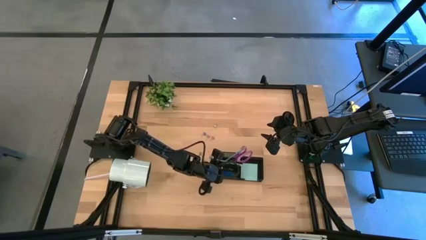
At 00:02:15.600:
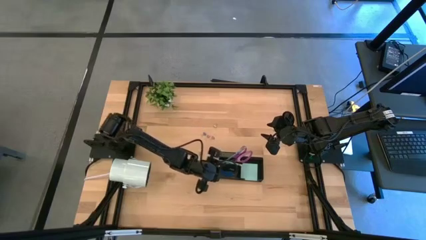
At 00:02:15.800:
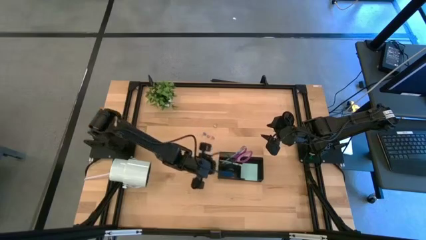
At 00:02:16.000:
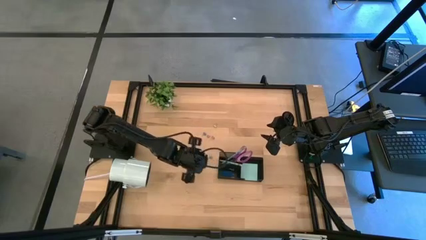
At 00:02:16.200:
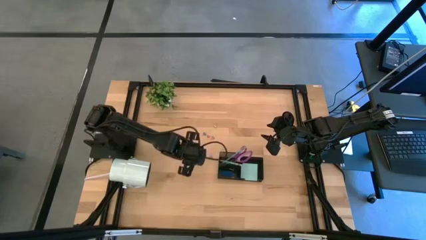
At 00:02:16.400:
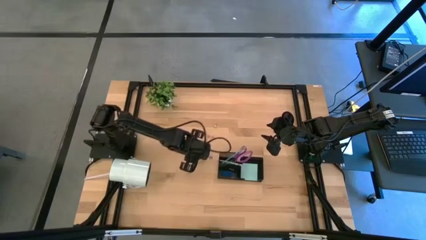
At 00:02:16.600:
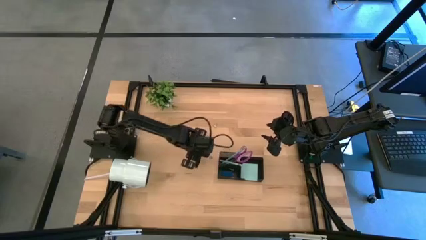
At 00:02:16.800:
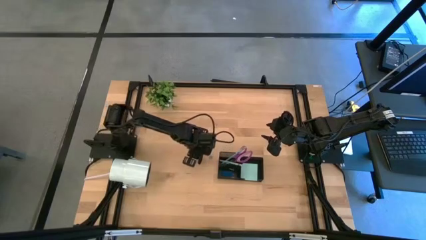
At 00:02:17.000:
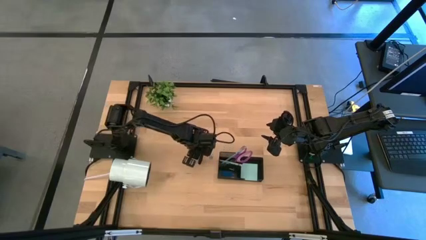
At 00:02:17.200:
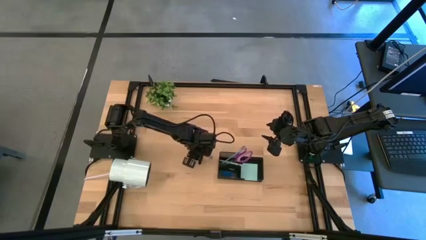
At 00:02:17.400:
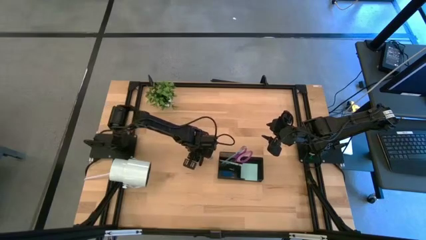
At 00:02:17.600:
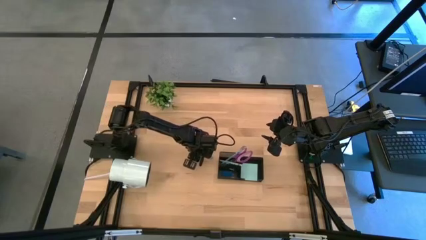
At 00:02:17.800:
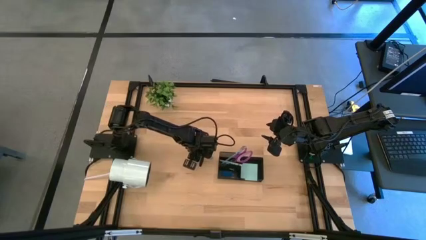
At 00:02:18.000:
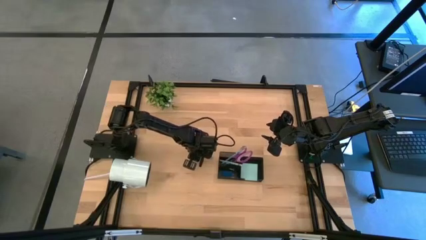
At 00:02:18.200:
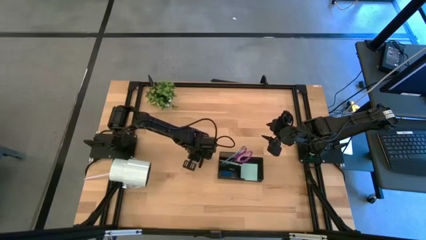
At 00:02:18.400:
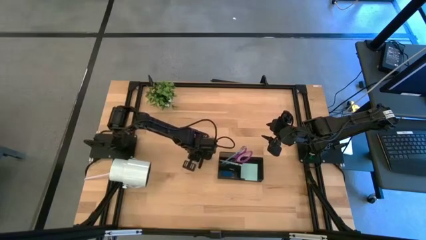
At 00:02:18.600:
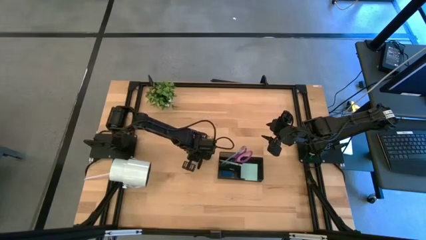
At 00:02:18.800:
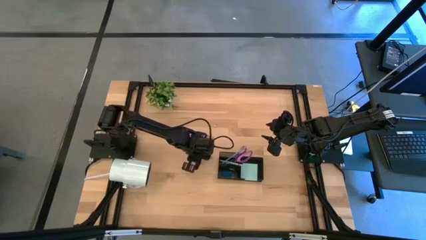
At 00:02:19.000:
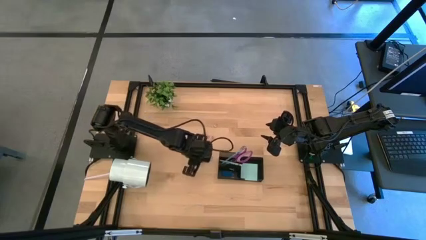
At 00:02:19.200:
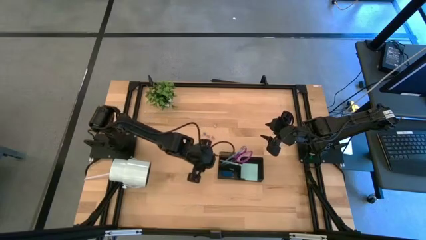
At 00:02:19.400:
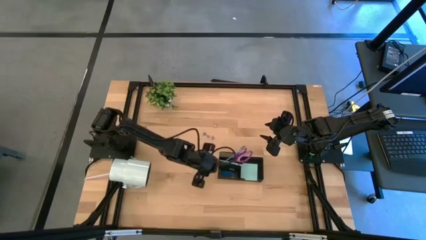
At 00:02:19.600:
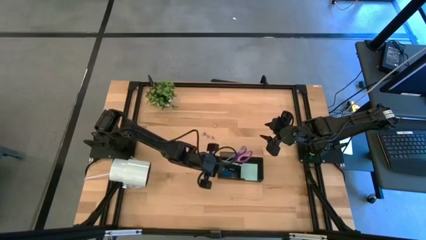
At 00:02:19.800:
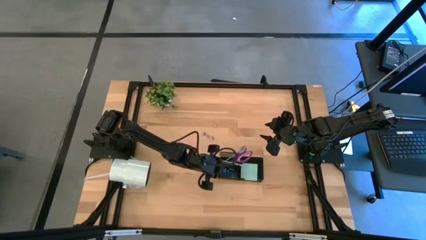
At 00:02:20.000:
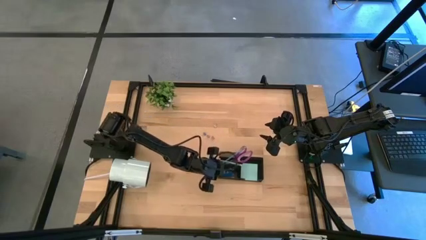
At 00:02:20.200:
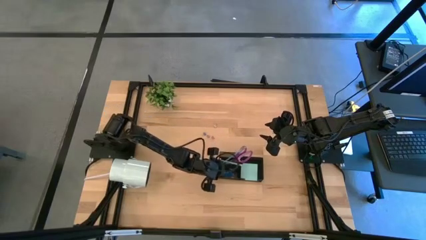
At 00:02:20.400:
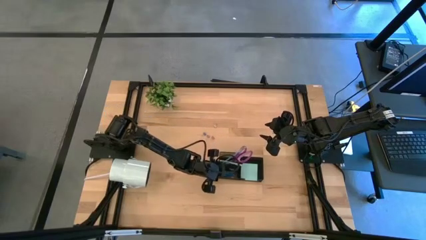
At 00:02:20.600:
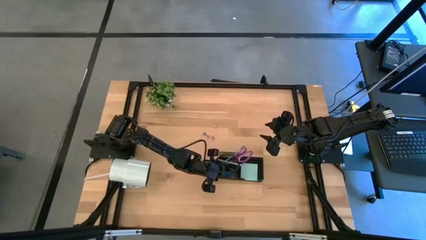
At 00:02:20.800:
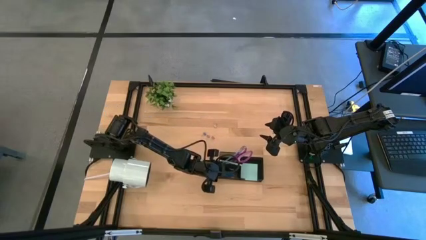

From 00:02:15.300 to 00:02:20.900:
Task: Pick and place office supplies into organizer
Put the bottom right blue binder clip into the desk organizer

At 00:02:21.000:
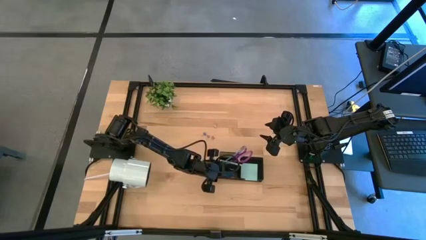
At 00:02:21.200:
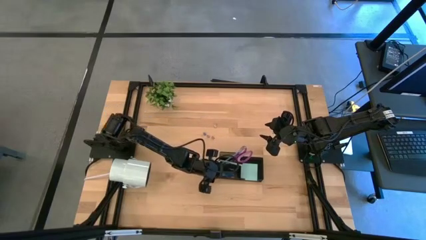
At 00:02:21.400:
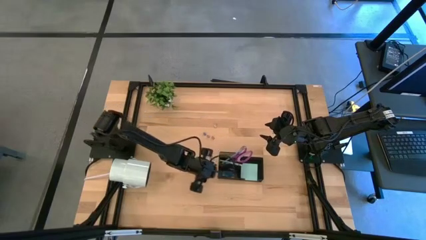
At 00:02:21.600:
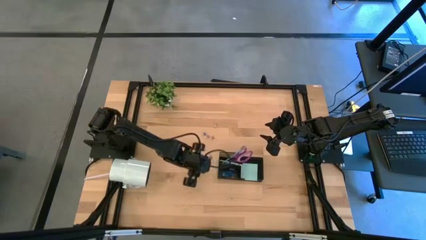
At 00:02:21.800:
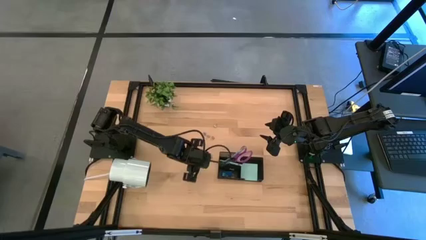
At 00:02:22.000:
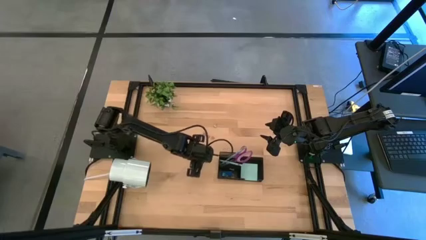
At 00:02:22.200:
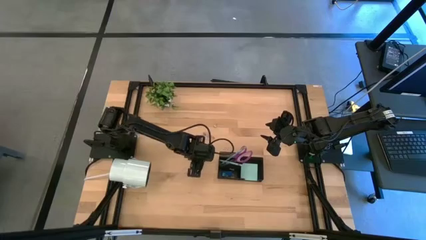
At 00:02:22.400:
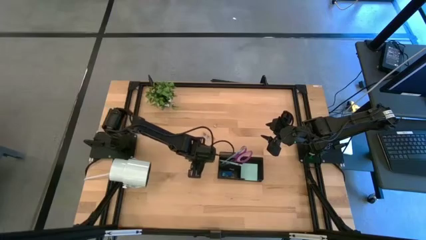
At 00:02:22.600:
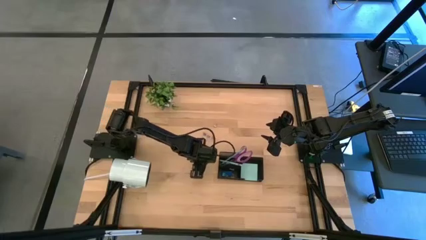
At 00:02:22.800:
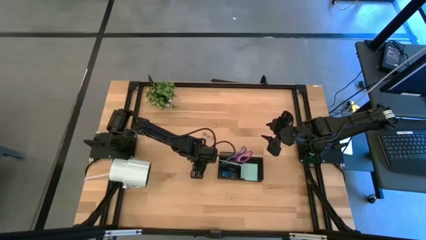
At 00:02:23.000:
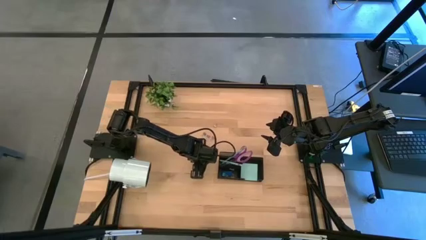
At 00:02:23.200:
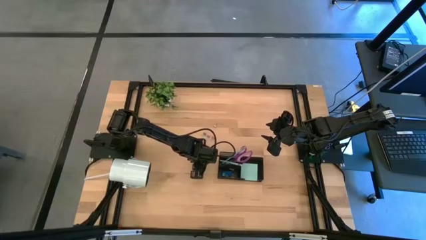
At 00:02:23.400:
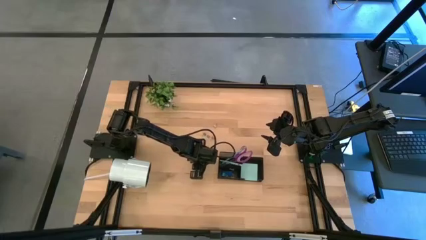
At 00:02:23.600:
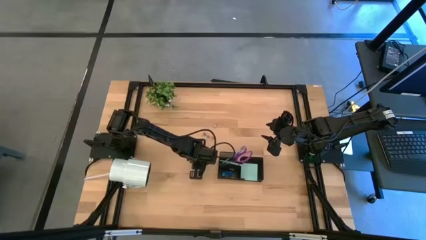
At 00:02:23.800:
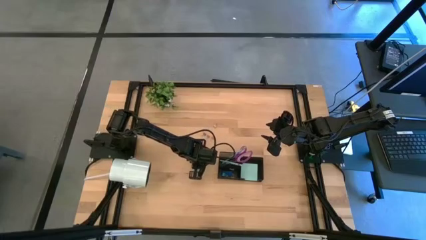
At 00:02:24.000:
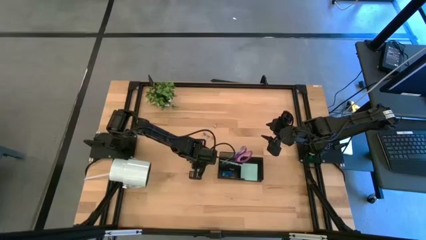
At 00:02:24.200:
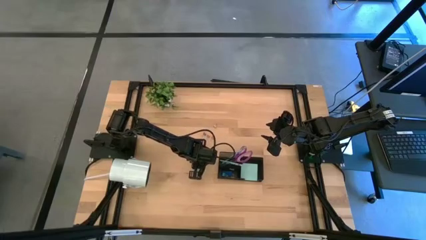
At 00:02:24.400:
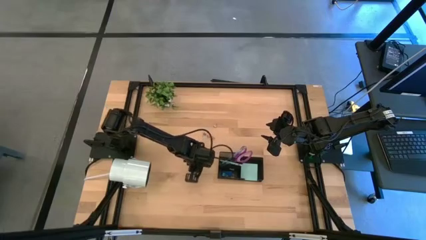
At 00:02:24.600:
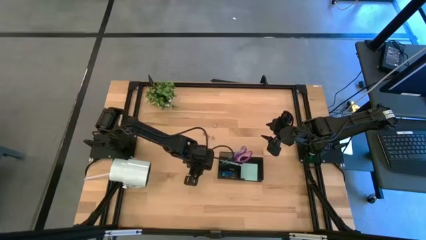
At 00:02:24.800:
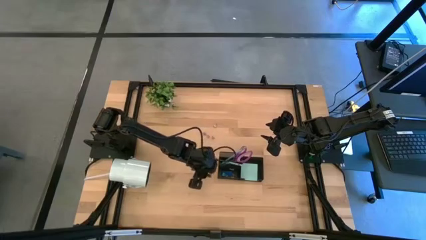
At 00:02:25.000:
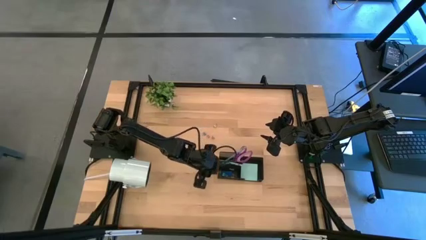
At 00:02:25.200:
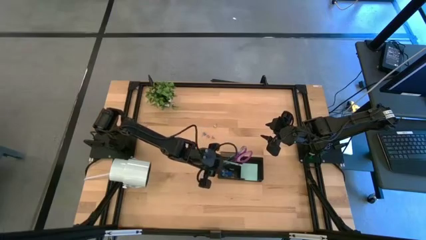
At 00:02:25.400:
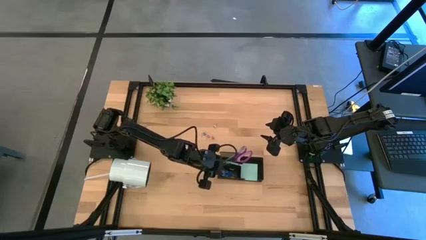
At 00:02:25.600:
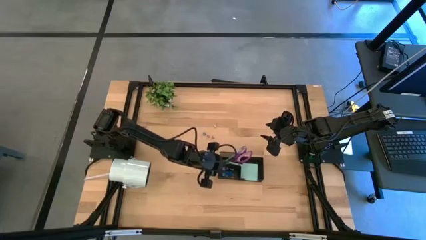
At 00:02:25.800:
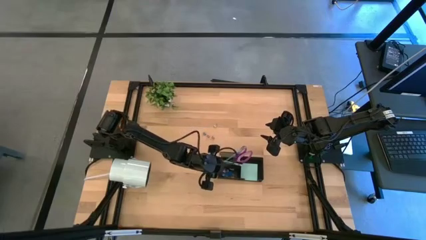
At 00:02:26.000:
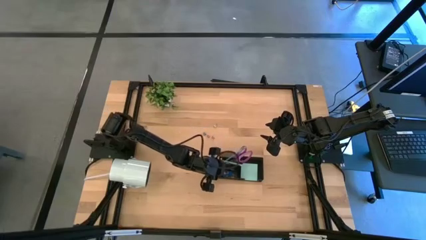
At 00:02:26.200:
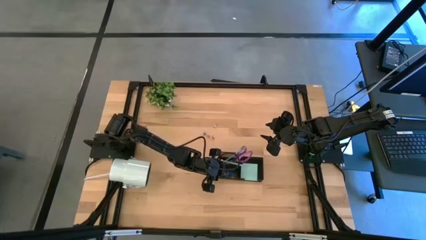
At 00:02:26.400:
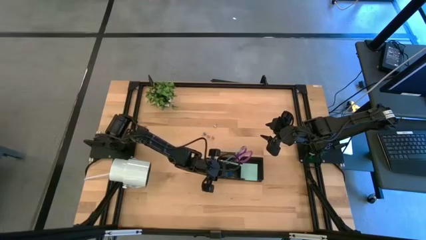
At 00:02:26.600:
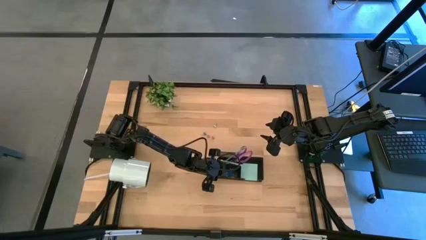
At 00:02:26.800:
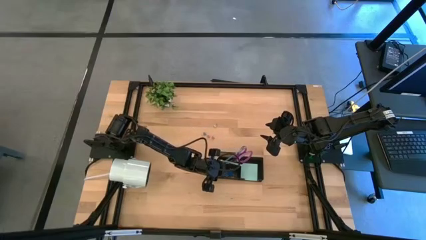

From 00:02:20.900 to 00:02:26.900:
Put the top pink binder clip into the desk organizer

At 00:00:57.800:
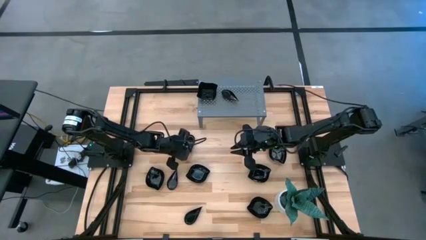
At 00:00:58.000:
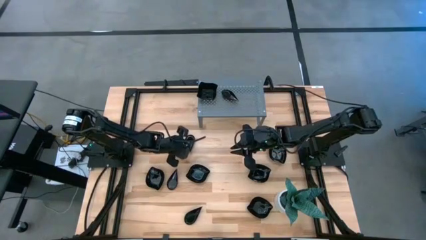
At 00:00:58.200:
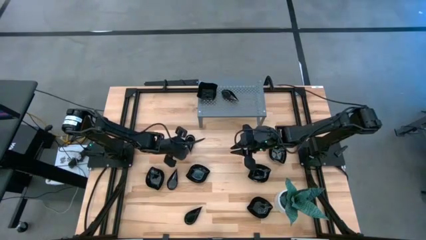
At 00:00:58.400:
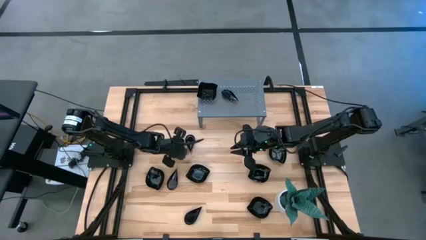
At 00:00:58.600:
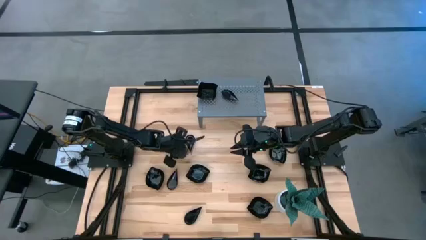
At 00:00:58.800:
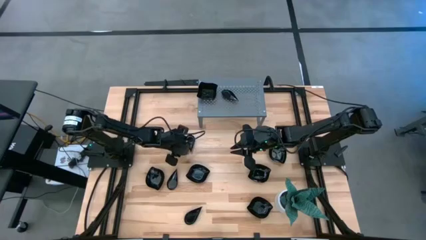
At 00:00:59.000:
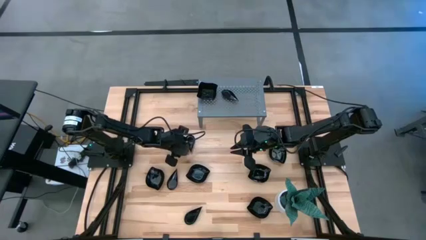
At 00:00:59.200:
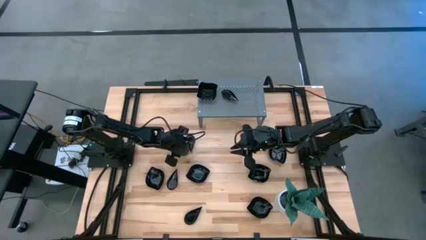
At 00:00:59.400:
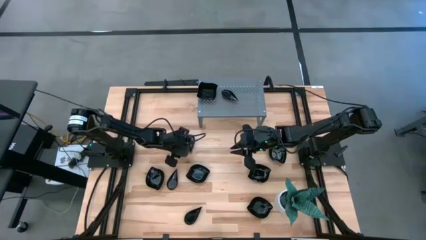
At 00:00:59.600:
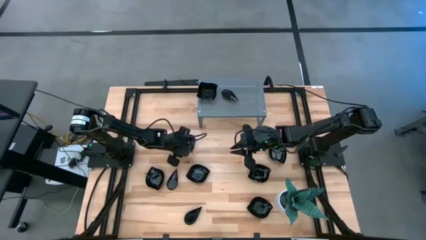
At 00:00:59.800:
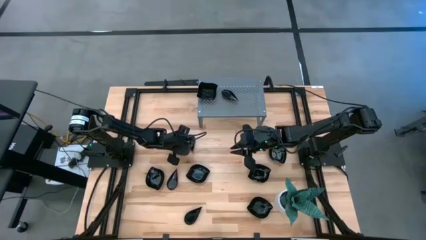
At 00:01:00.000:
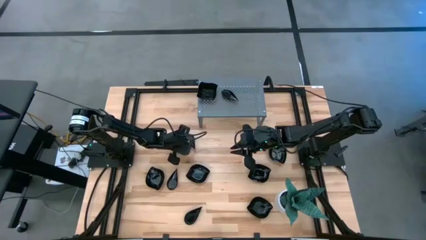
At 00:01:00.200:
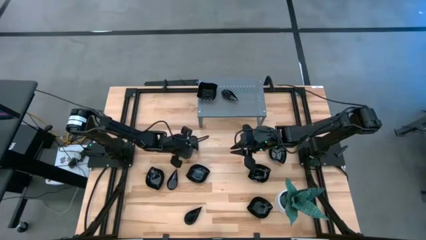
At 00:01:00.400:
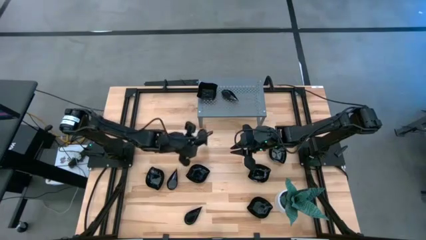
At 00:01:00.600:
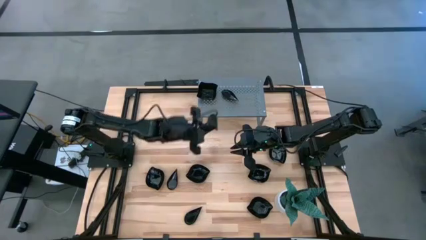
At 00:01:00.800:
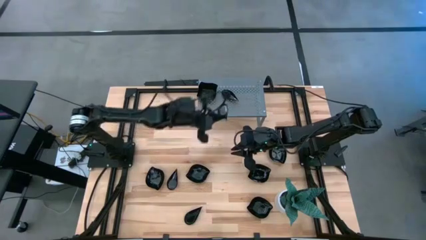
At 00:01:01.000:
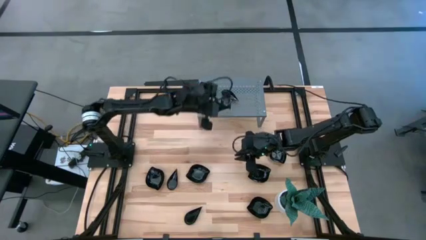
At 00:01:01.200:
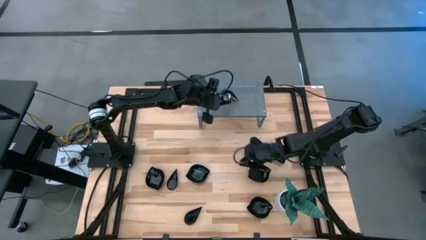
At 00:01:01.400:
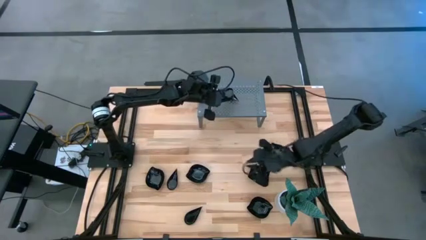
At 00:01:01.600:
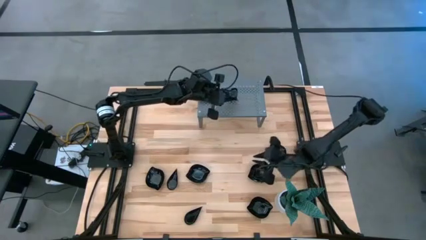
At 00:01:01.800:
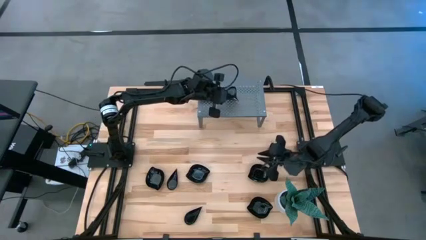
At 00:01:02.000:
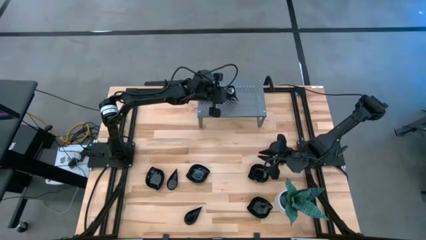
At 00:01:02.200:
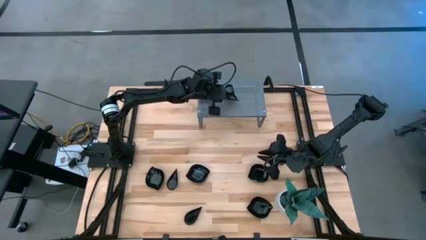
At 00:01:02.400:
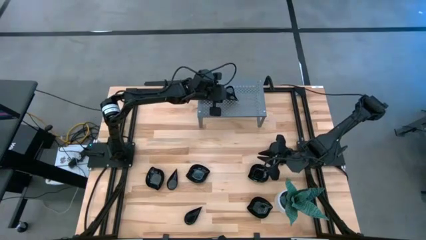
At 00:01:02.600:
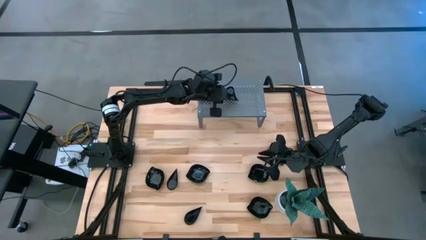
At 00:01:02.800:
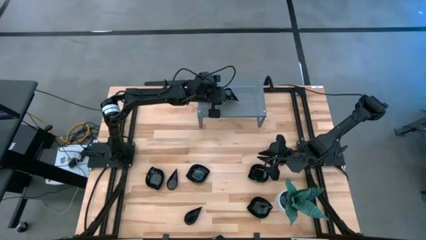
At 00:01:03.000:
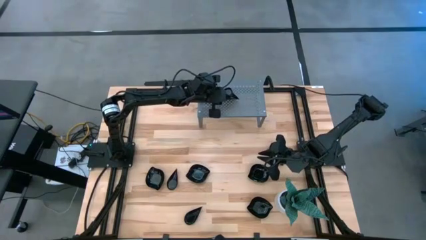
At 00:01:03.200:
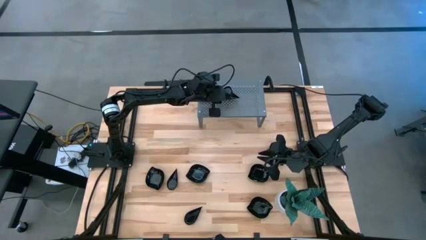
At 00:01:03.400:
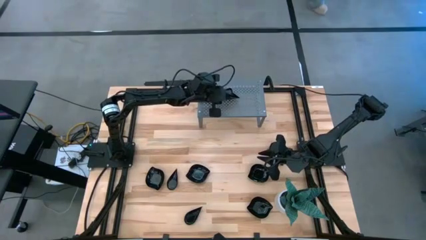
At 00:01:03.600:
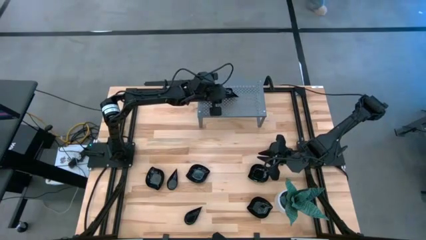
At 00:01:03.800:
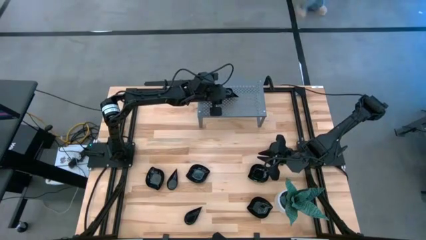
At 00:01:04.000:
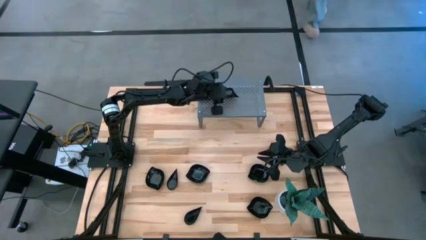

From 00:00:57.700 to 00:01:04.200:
Task: Pick & Place Mini shaped plates
Stack the drop-shaped plate on top of the drop-shaped plate on the shelf
